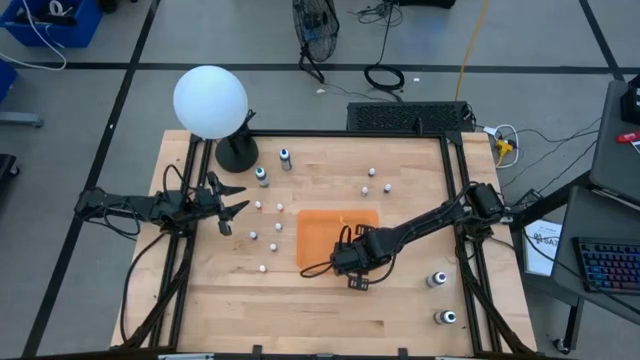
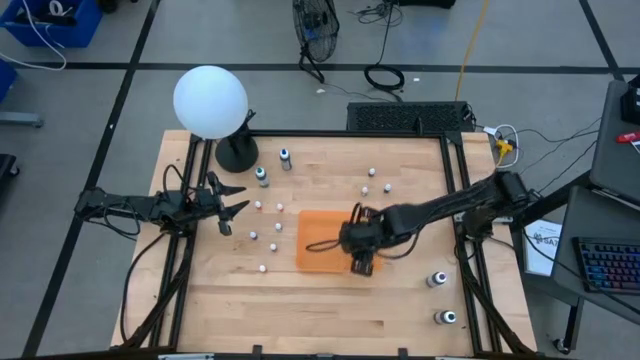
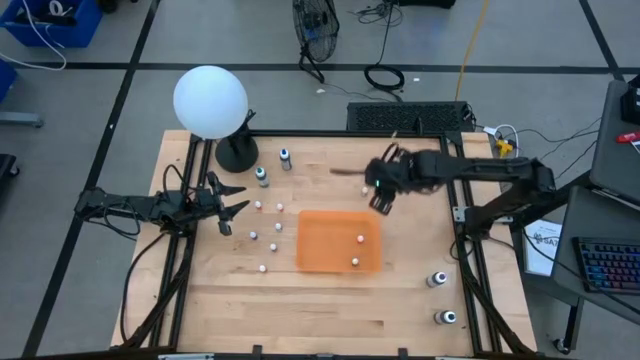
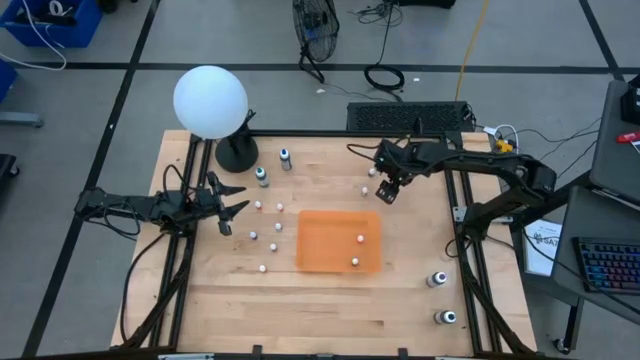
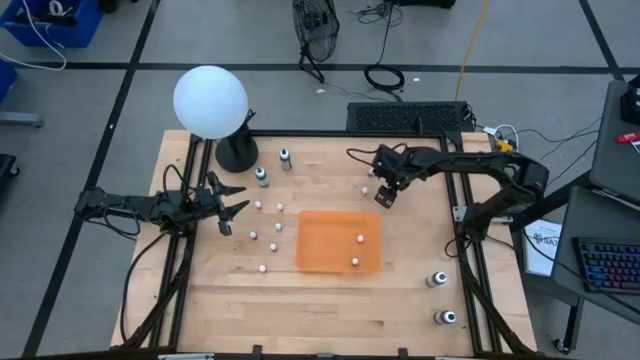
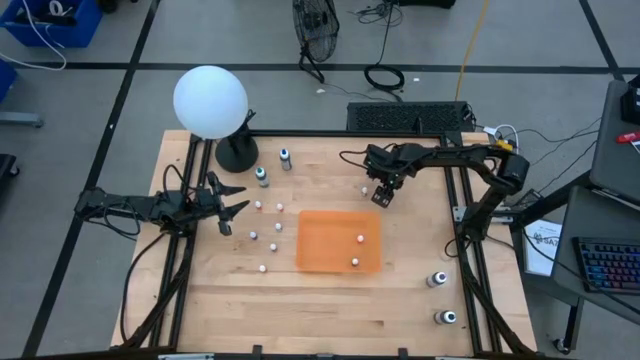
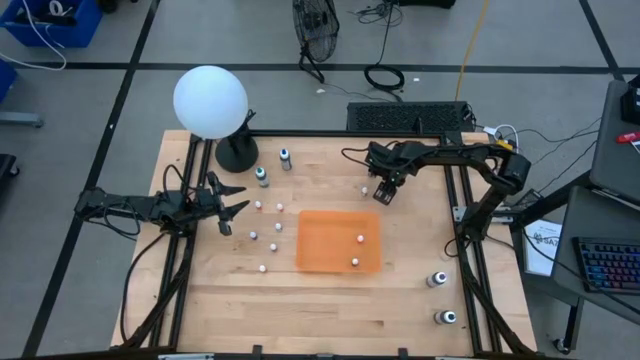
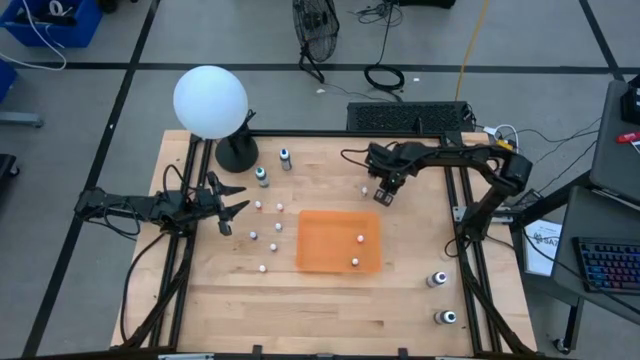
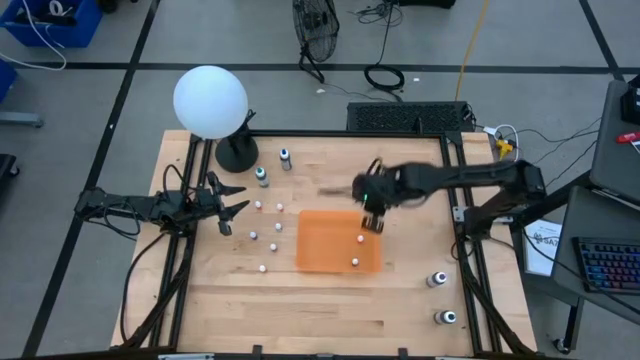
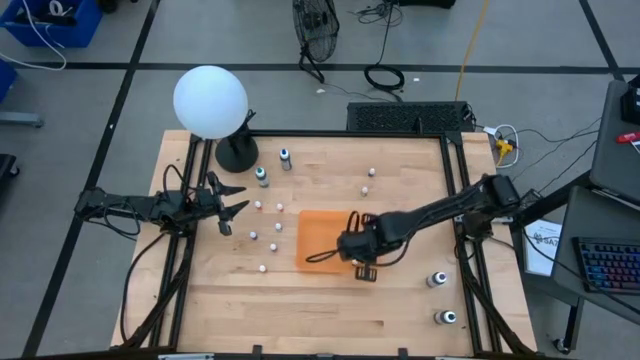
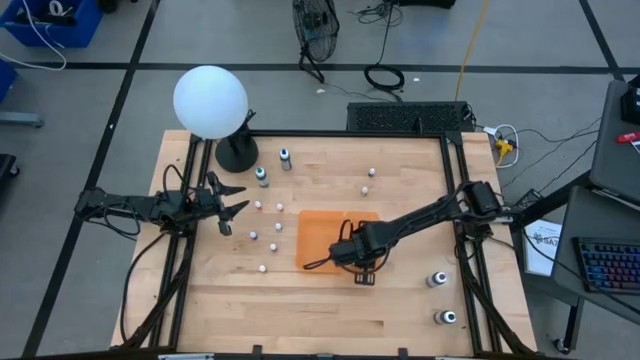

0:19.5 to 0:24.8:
Task: Pick & Place food coloring
Put the small black food coloring bottle into the container

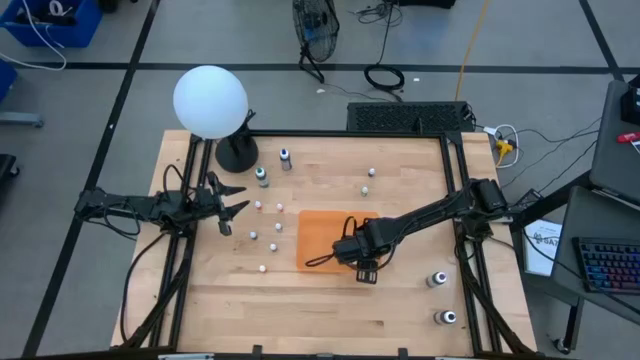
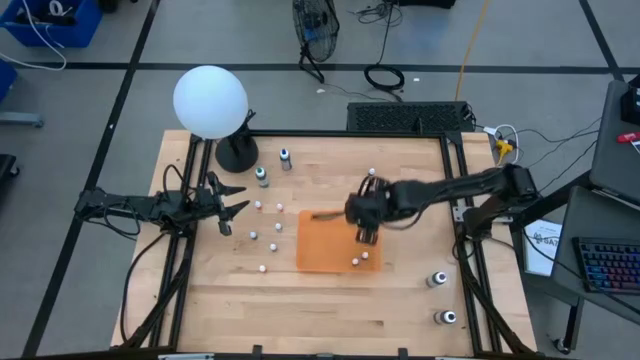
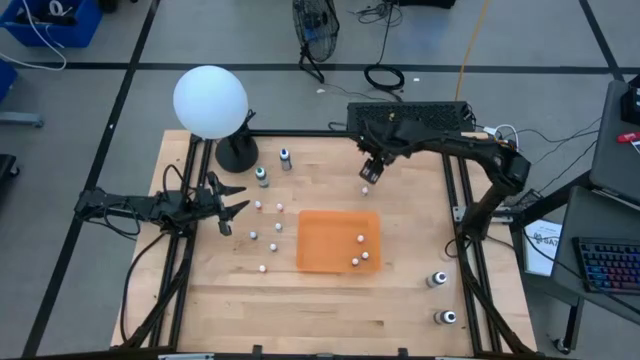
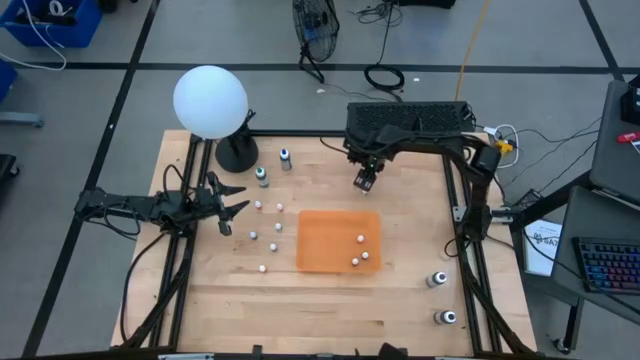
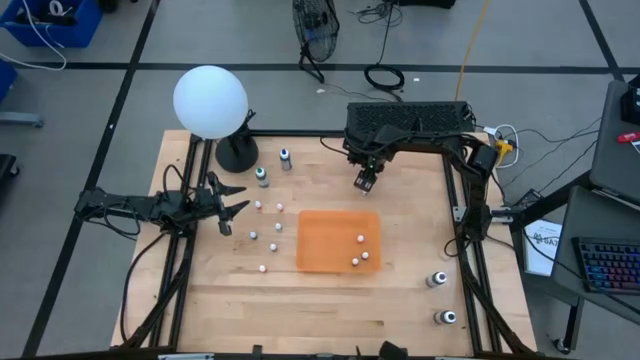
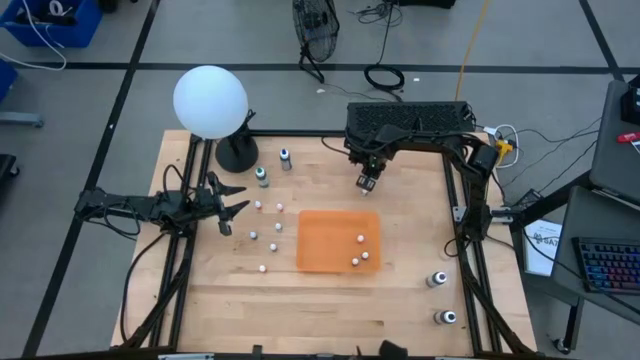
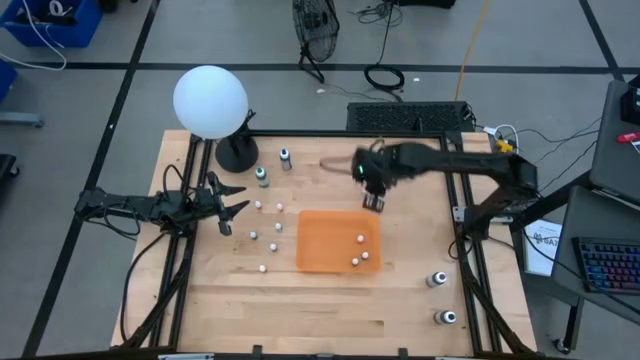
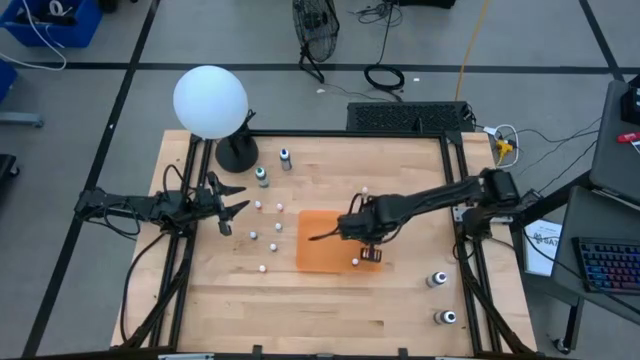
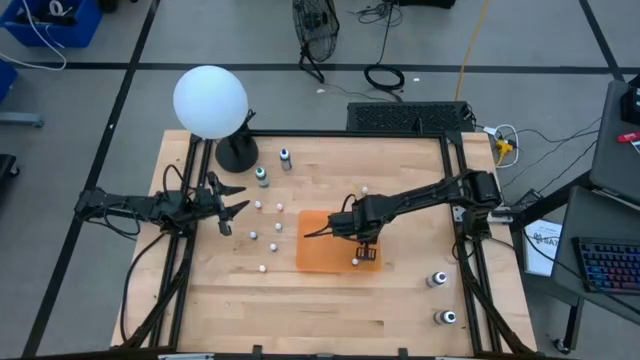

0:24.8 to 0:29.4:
Put the small purple food coloring bottle into the container

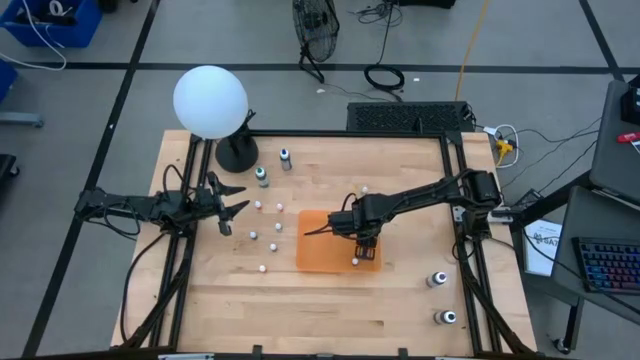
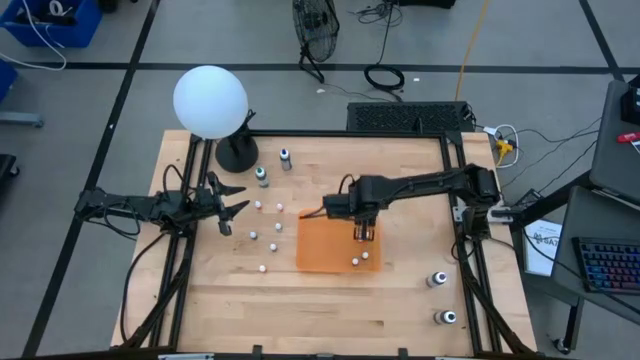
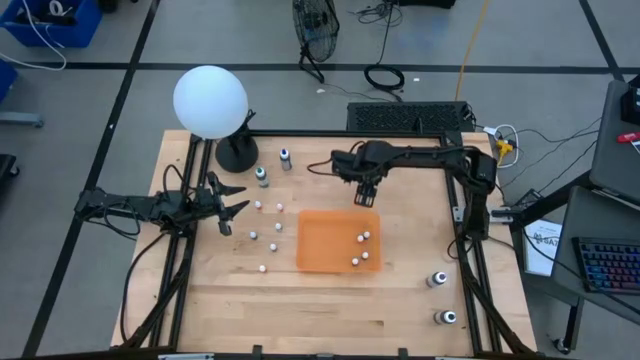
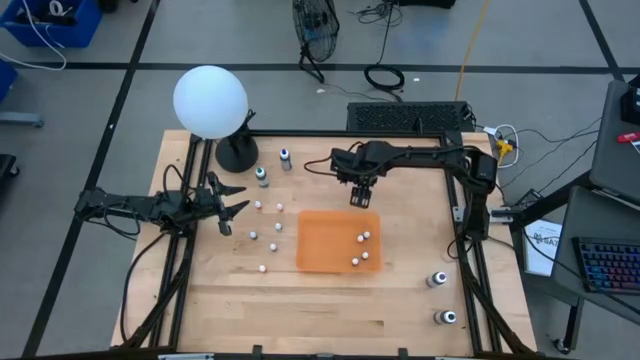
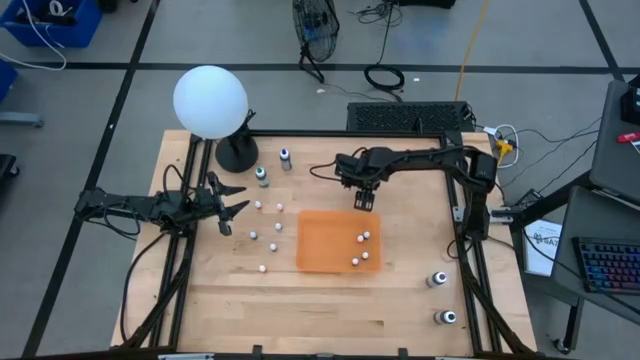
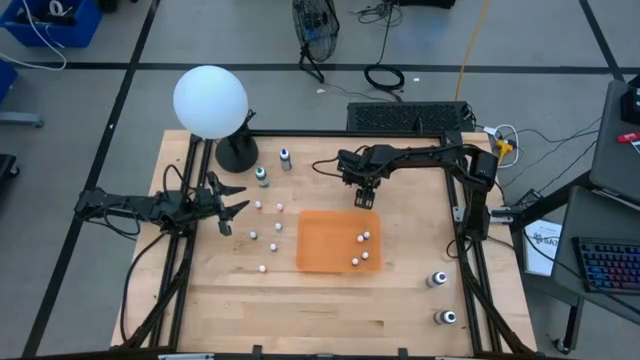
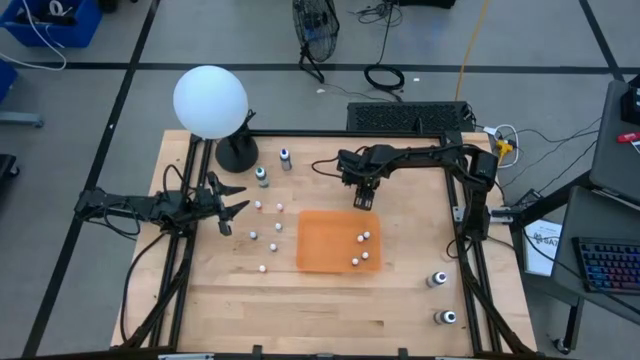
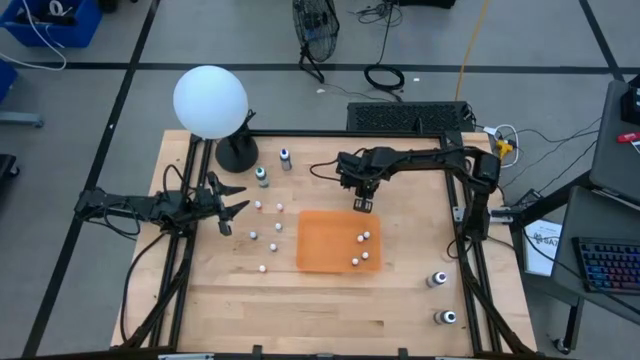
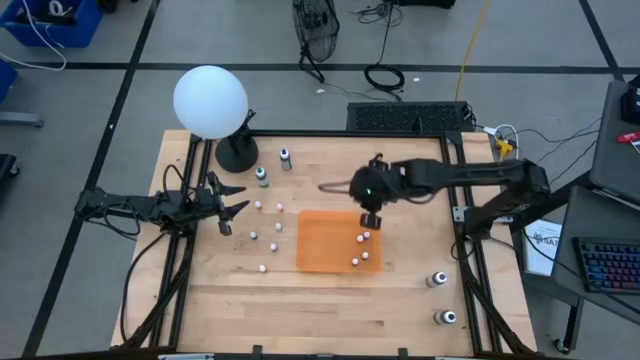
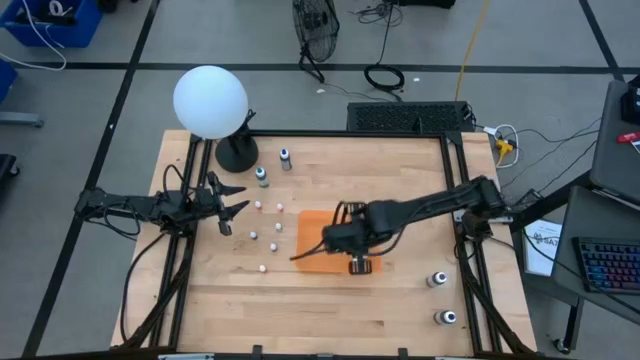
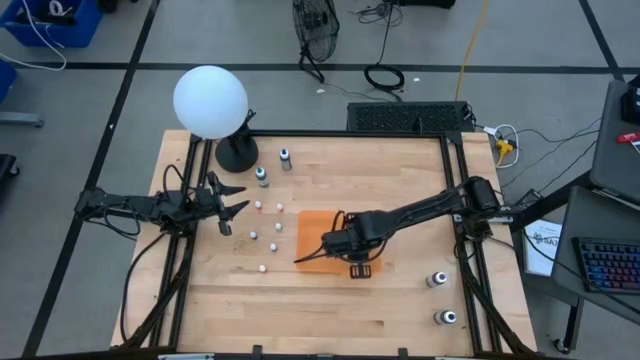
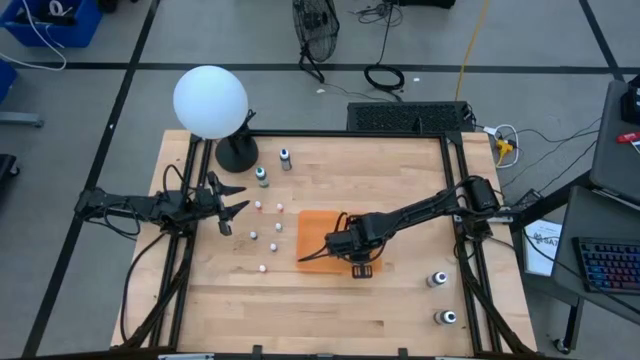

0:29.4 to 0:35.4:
Put the small green food coloring bottle into the container

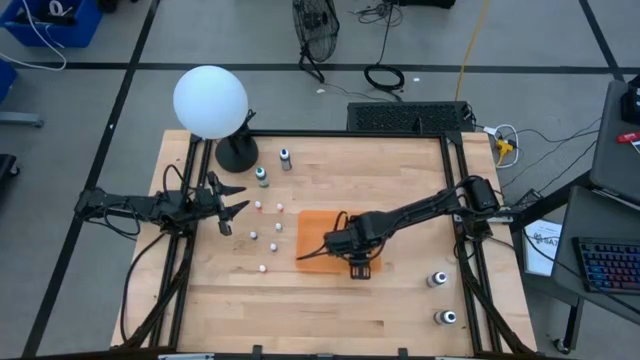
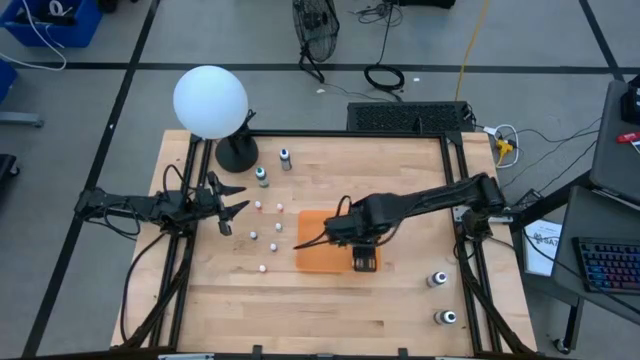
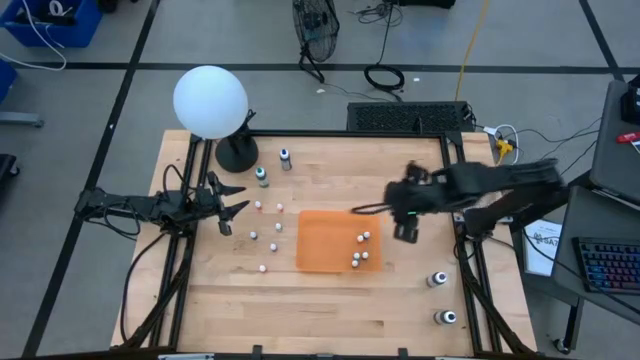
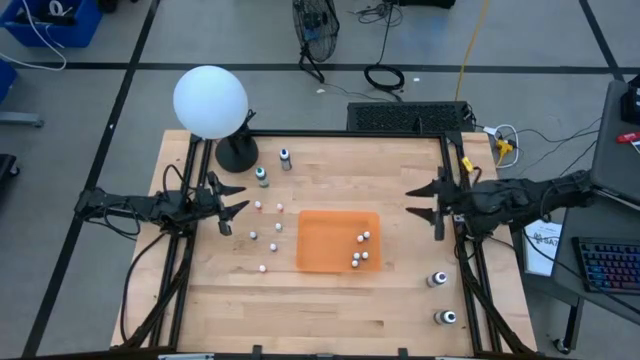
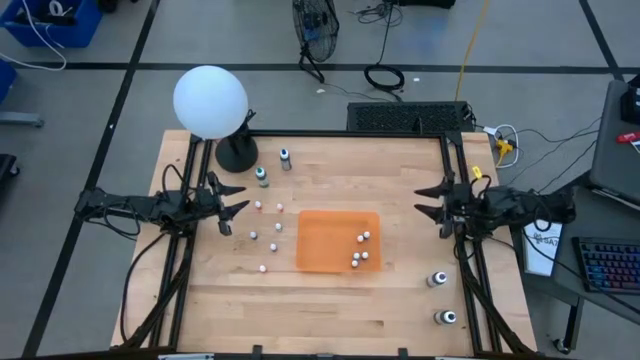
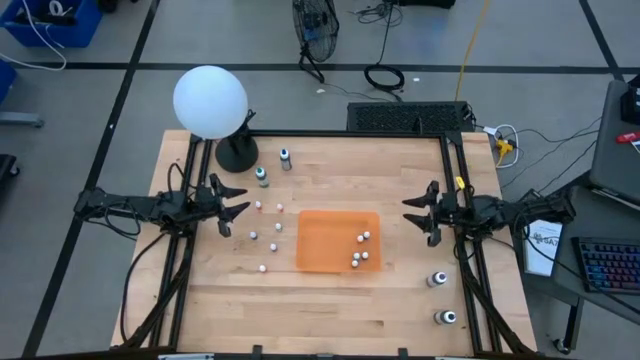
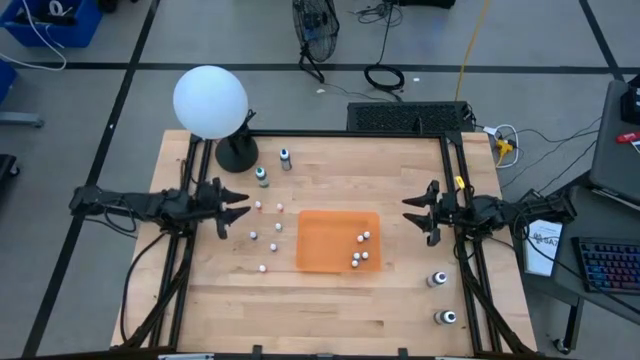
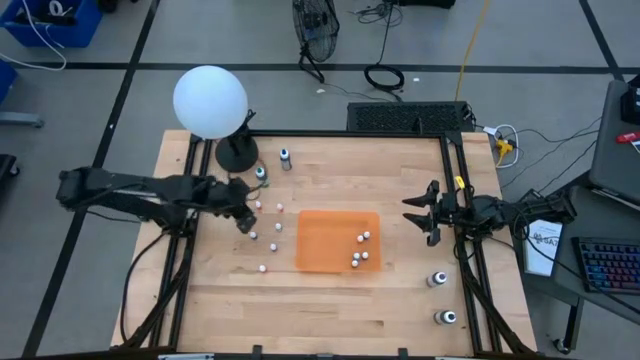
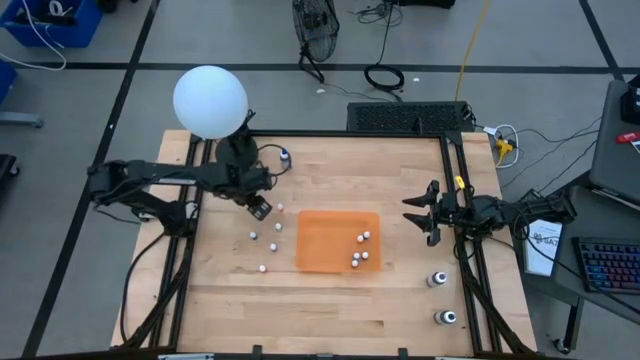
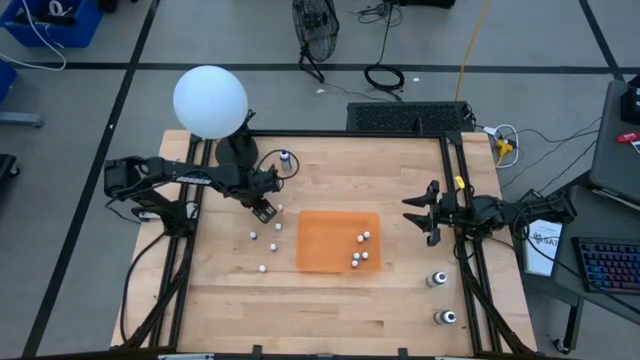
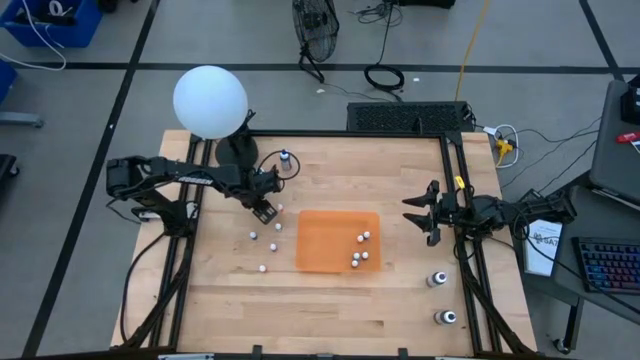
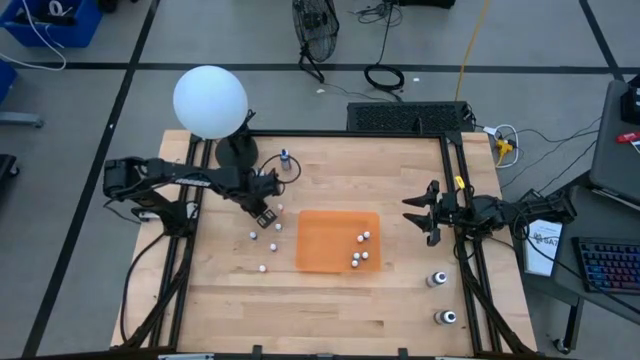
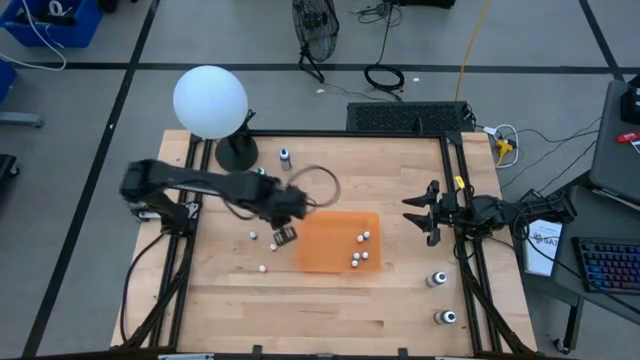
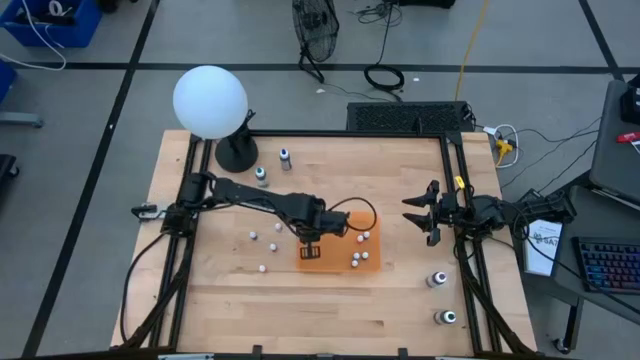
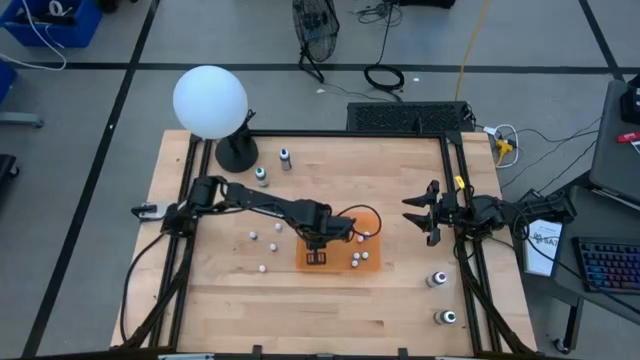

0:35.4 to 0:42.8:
Put the small orange food coloring bottle into the container
